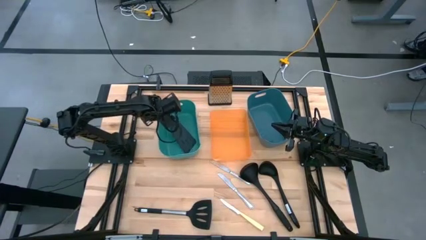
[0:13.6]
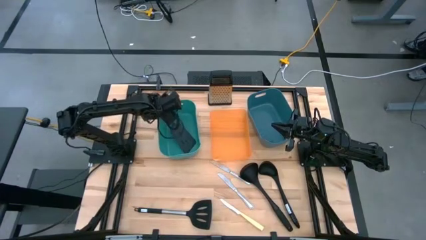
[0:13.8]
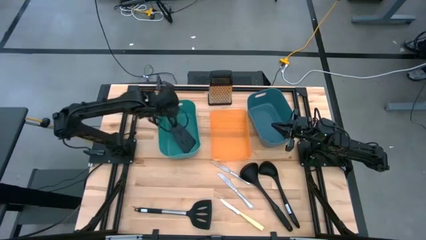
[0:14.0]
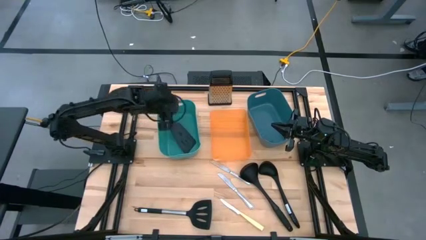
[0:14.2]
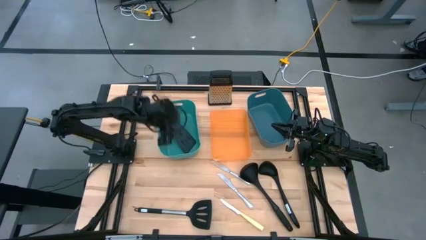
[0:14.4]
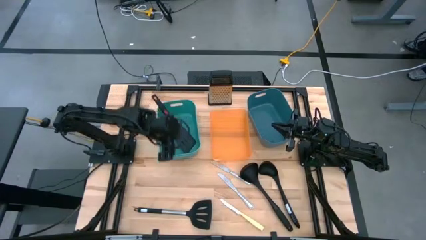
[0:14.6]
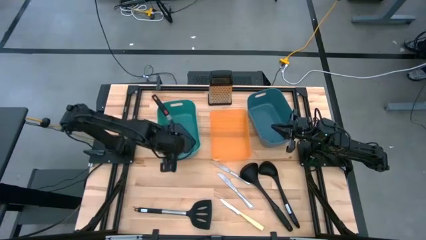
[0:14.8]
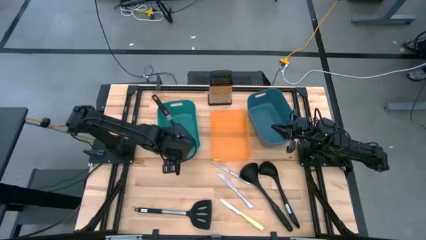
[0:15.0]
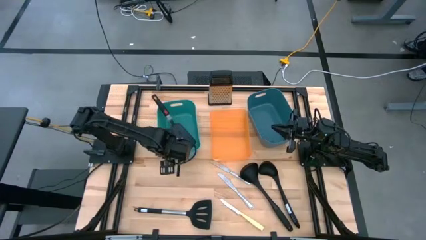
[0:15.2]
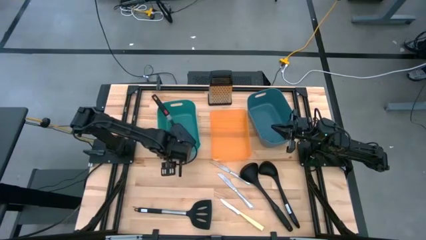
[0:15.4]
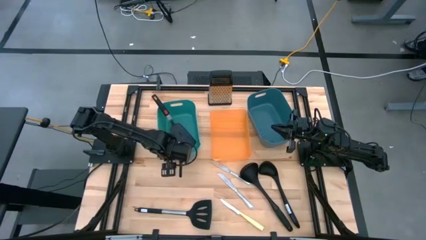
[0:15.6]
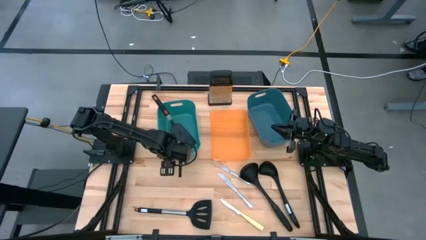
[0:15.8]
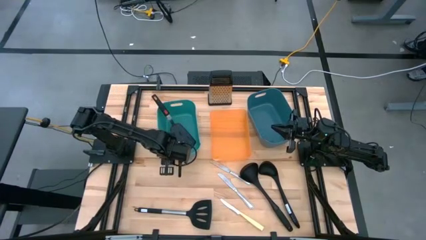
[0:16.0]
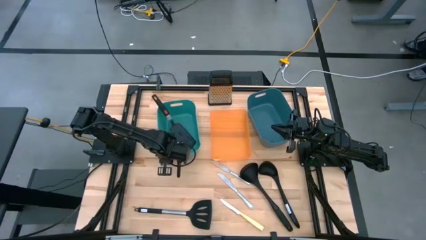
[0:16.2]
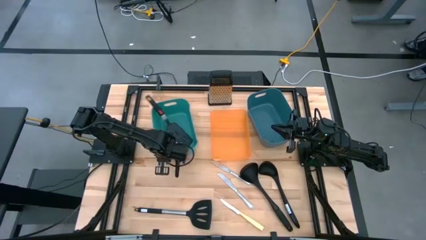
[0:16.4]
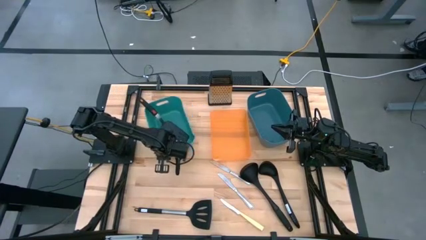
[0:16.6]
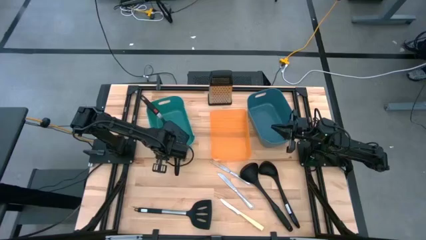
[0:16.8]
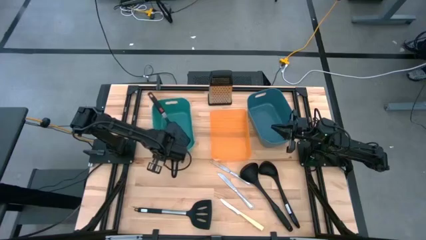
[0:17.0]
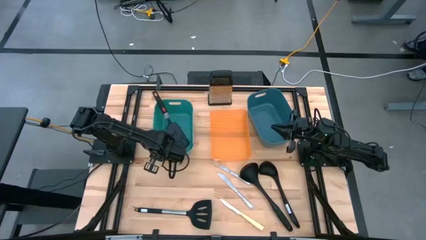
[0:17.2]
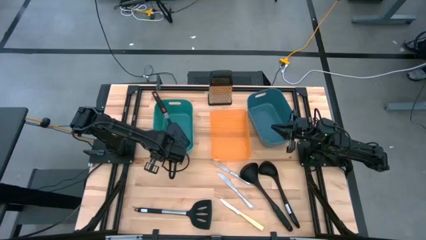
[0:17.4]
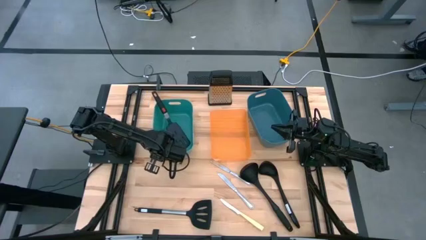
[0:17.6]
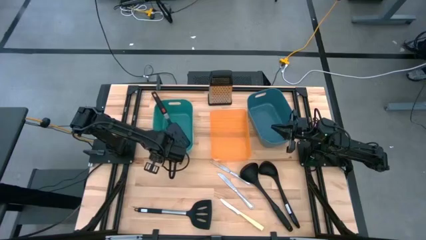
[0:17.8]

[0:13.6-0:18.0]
Task: Pick & Place Kitchen Items
Adjust the green bin

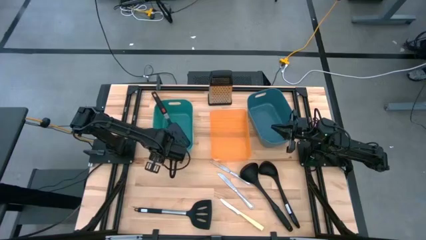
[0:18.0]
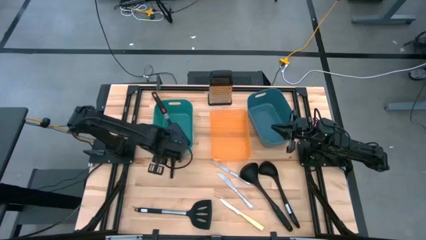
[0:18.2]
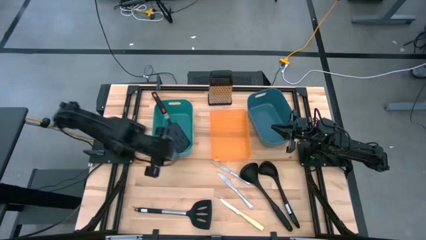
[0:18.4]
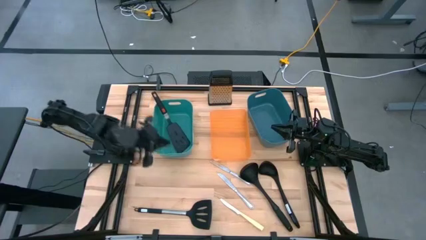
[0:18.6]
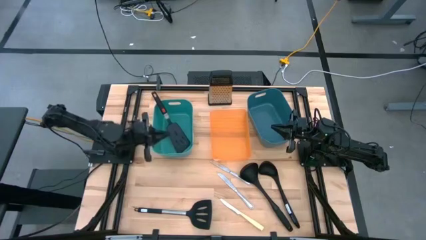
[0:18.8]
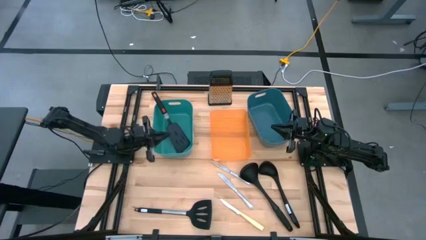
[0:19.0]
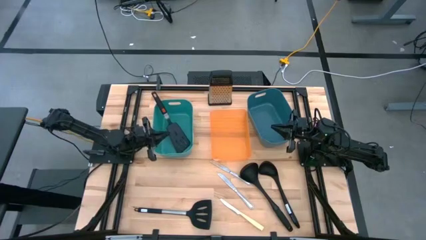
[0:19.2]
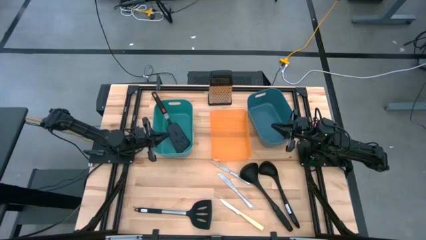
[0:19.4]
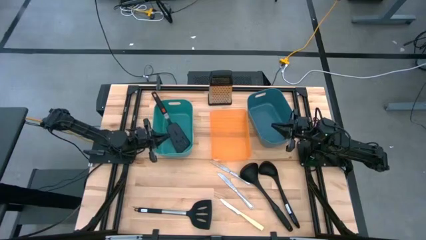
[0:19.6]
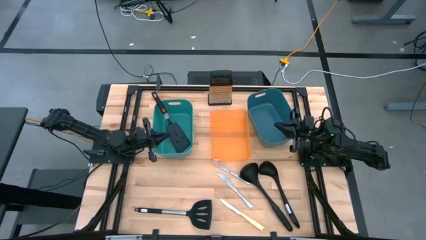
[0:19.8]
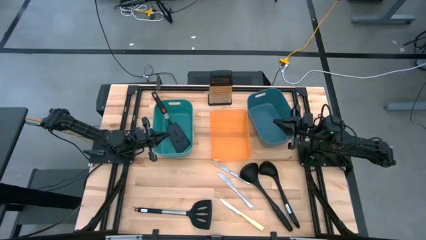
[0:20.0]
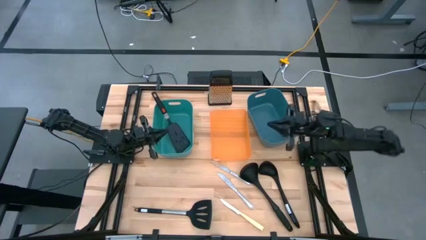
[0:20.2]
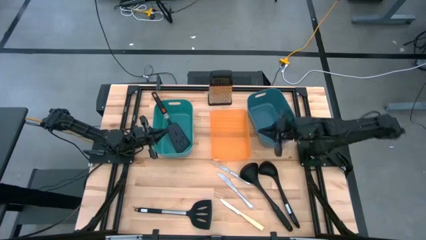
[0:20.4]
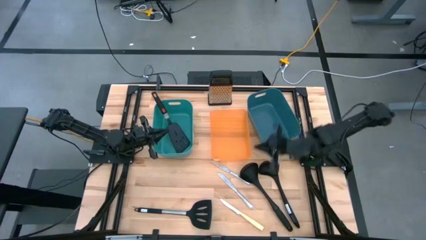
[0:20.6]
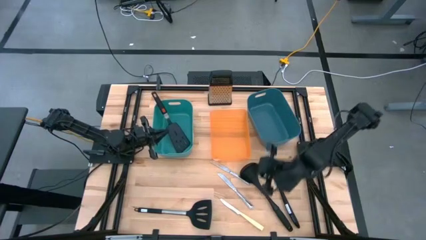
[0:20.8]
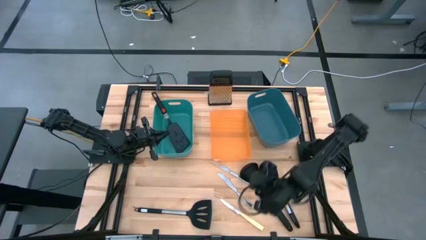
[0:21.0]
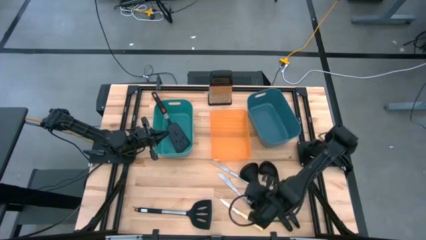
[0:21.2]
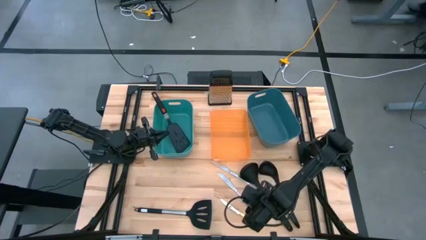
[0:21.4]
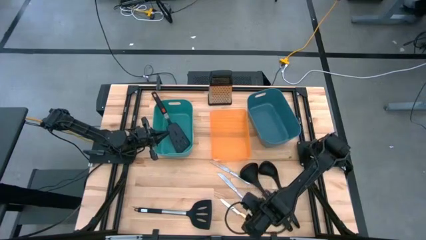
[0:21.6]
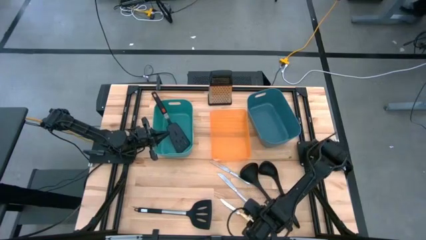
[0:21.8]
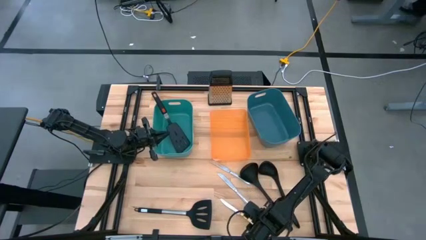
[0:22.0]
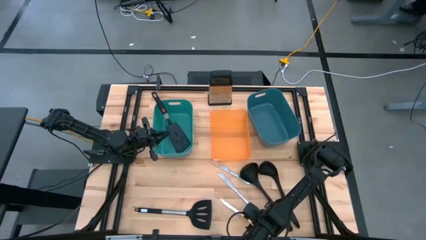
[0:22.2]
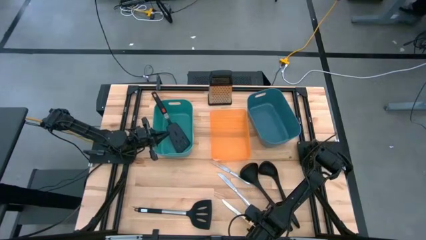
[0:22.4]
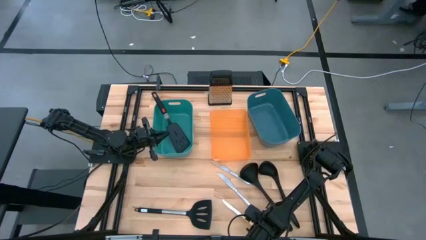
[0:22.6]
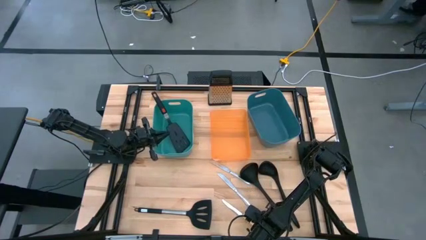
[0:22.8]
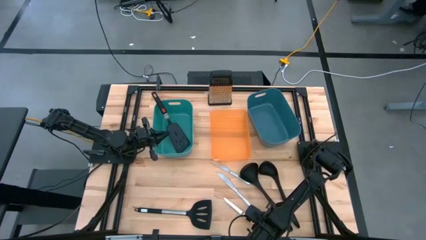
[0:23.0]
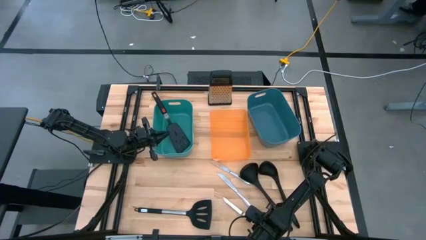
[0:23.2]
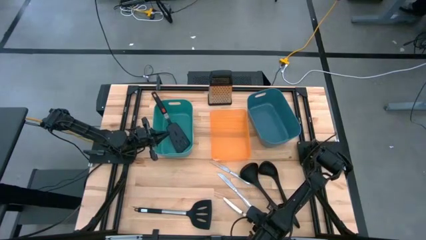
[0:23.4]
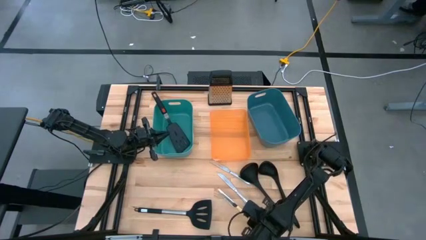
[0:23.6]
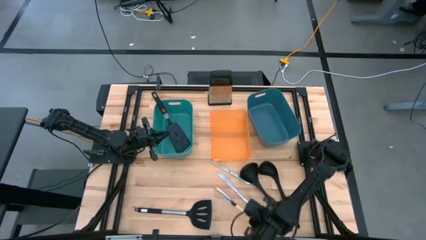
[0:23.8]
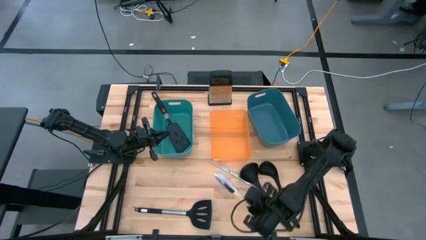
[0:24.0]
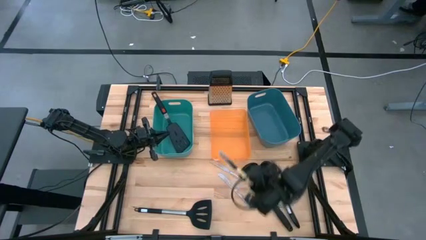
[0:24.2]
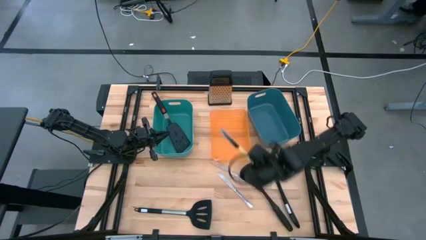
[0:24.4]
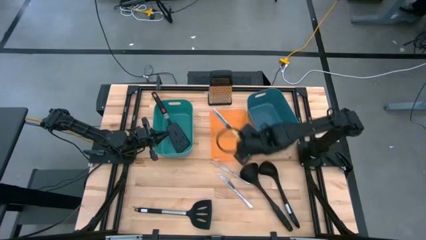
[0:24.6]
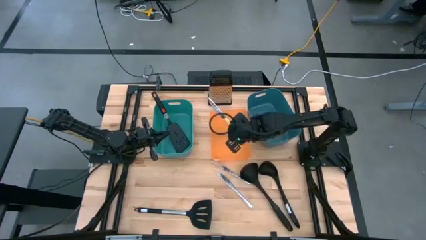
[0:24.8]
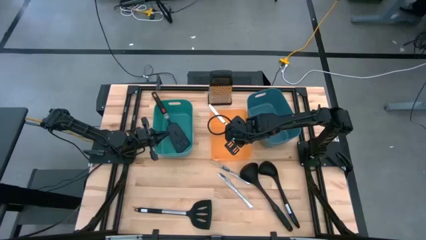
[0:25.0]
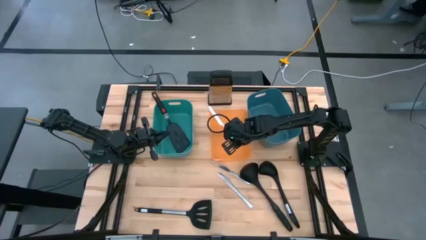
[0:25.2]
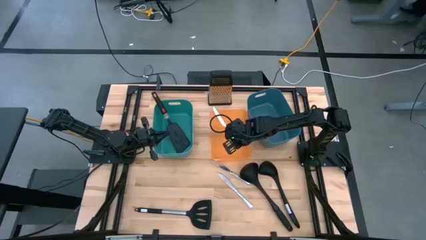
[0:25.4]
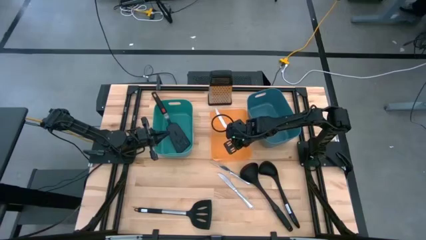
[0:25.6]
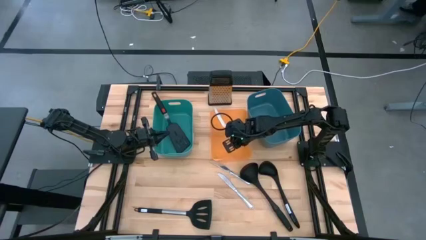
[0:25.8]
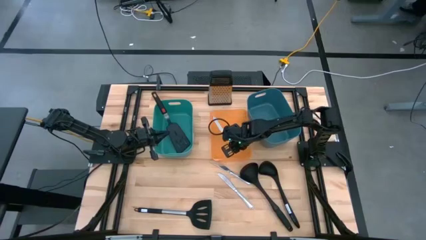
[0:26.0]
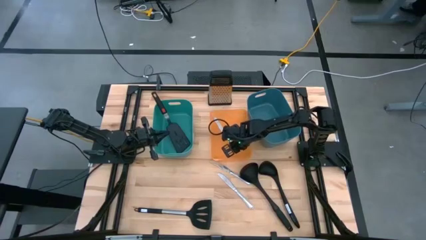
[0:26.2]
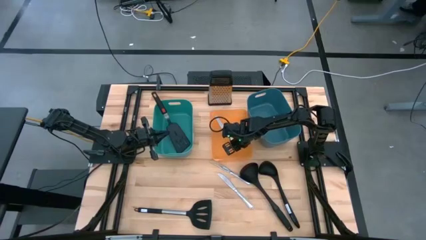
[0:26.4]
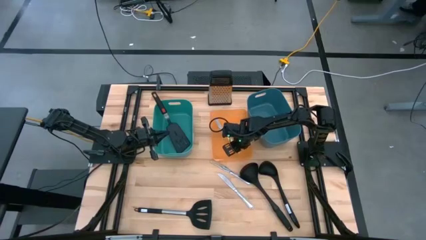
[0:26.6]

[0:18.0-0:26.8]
Put the yellow knife into the orange bin

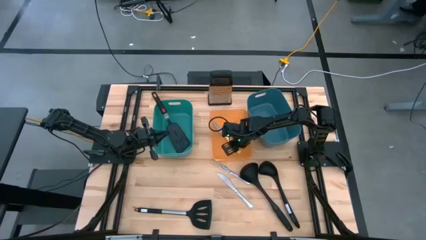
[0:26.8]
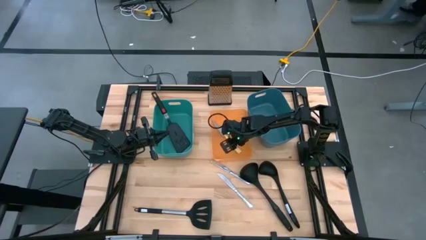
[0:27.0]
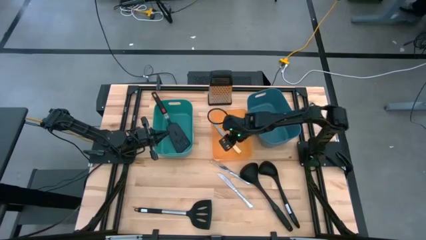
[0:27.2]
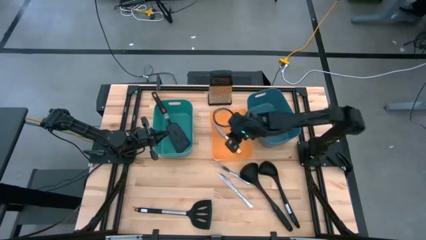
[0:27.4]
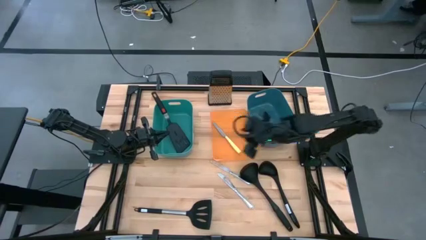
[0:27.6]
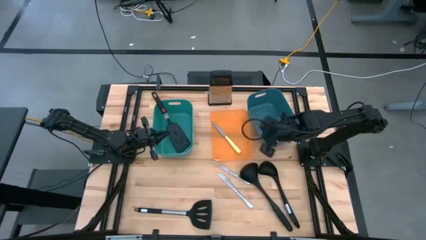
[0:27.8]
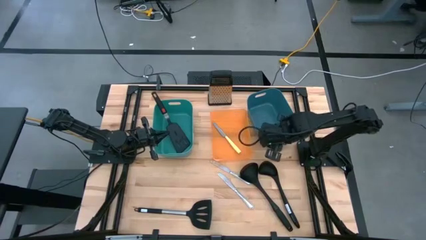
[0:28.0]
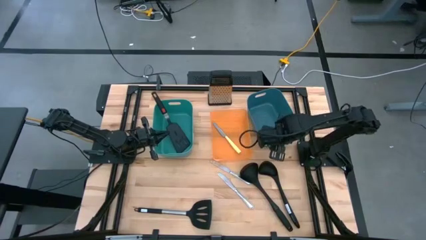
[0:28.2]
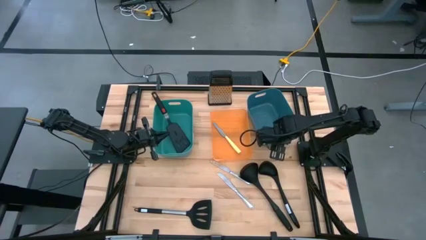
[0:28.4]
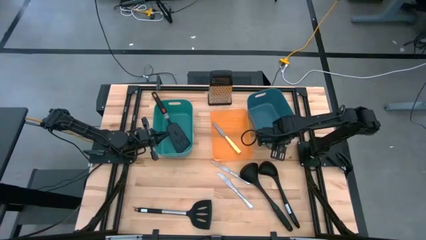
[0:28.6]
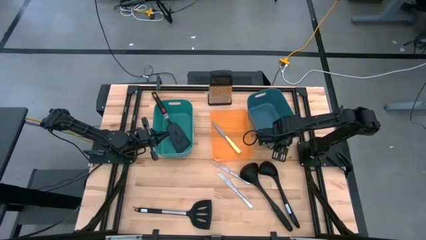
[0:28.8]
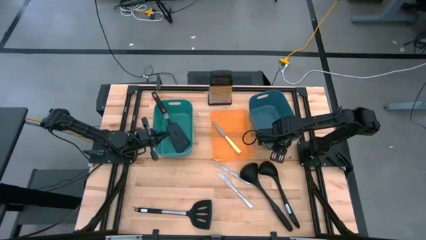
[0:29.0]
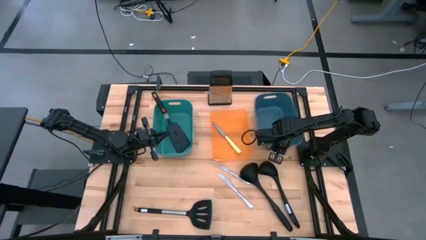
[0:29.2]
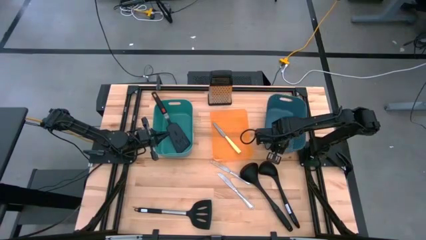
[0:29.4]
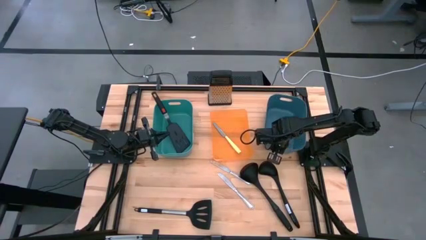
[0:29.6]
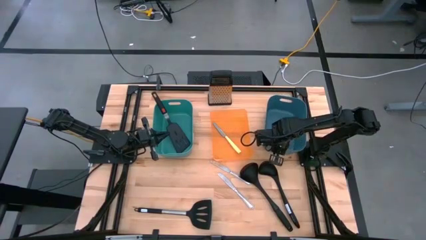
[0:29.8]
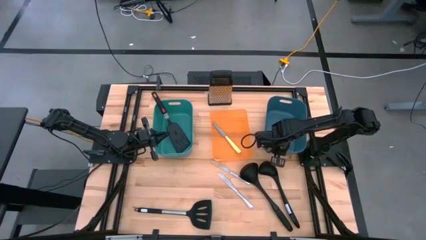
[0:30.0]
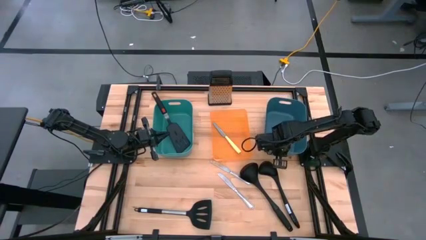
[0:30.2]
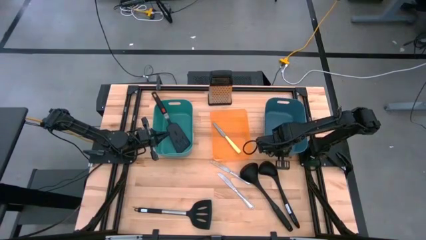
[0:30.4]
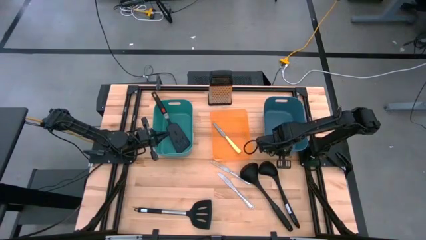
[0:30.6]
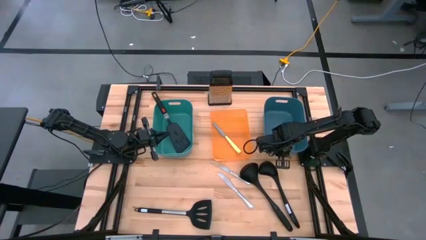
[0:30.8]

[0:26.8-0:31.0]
Adjust the blue bin
